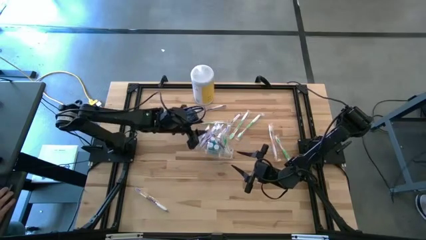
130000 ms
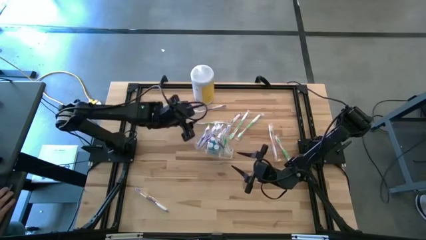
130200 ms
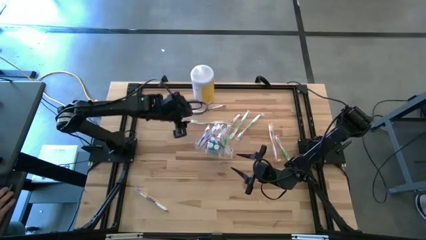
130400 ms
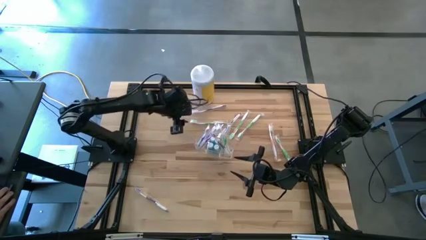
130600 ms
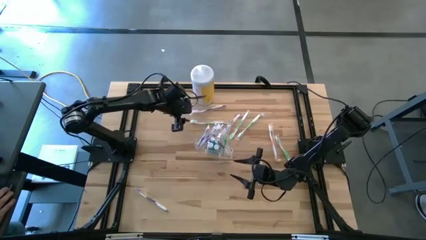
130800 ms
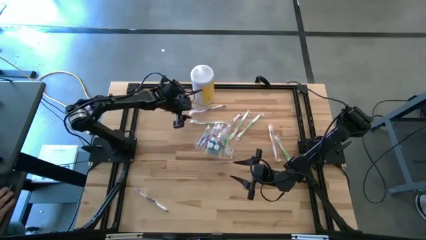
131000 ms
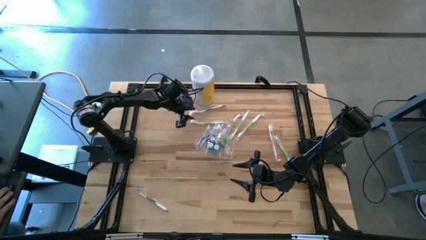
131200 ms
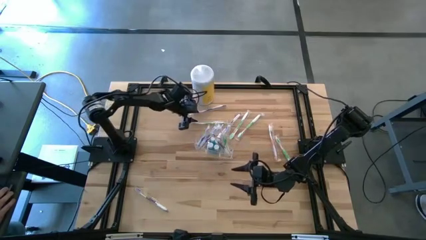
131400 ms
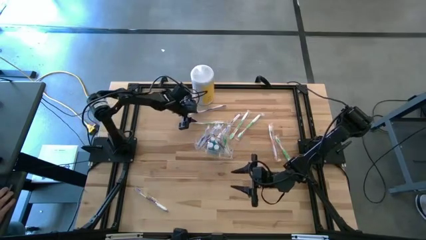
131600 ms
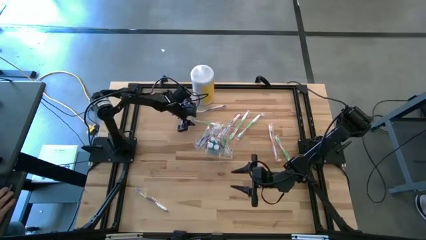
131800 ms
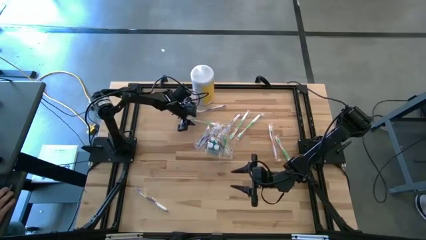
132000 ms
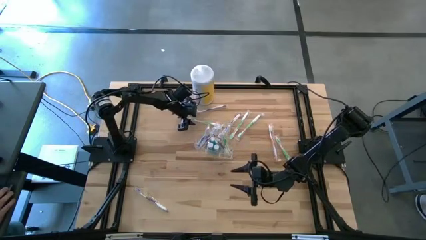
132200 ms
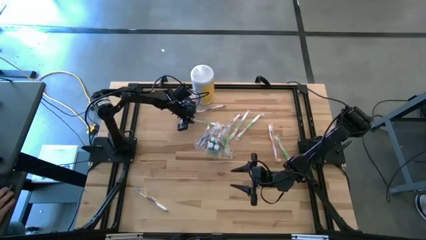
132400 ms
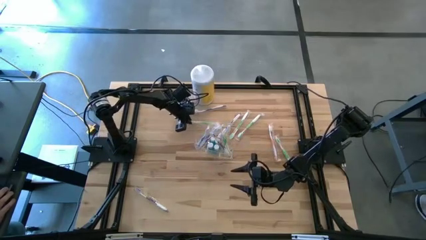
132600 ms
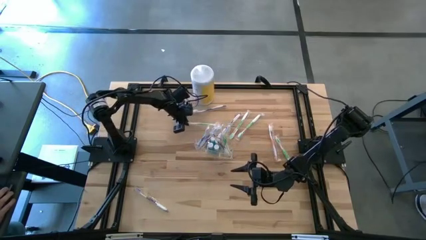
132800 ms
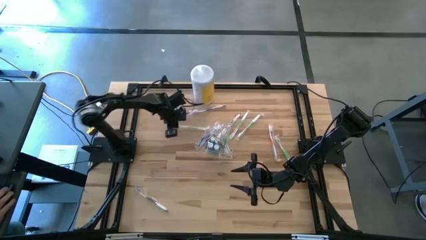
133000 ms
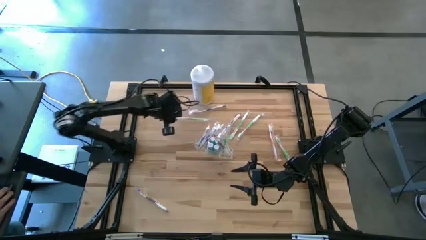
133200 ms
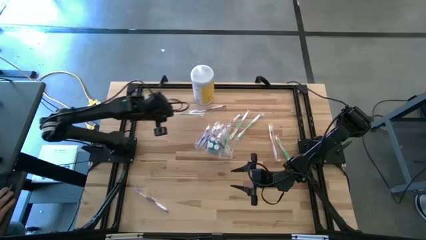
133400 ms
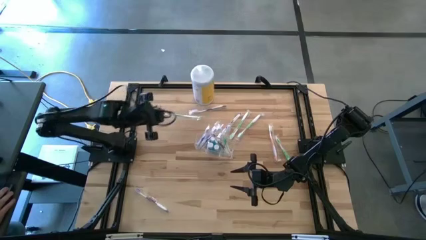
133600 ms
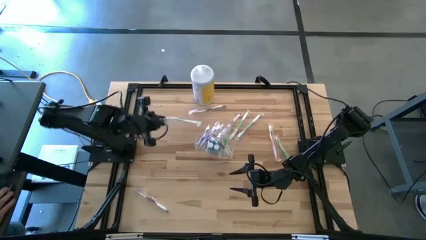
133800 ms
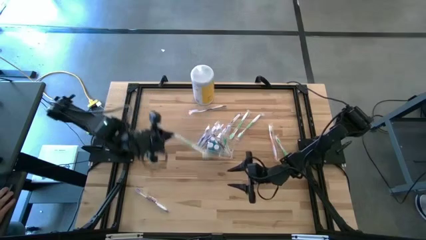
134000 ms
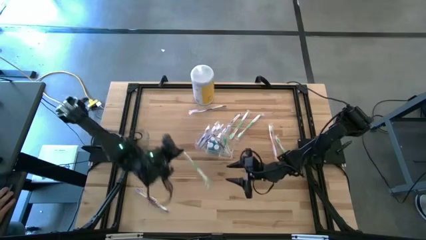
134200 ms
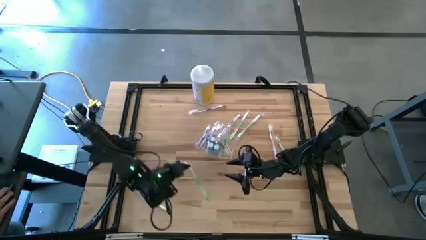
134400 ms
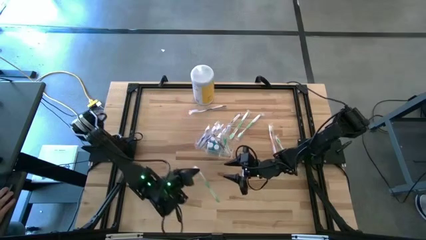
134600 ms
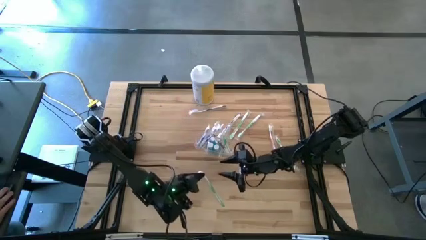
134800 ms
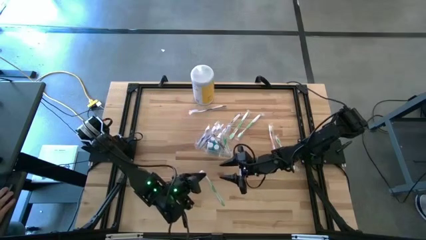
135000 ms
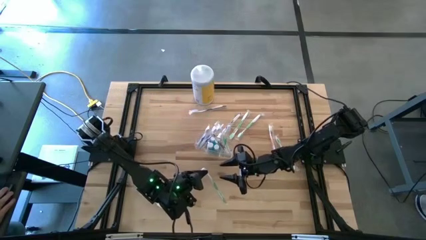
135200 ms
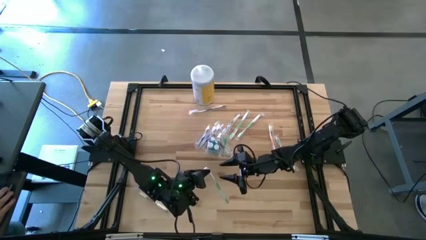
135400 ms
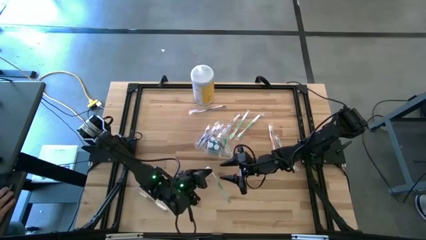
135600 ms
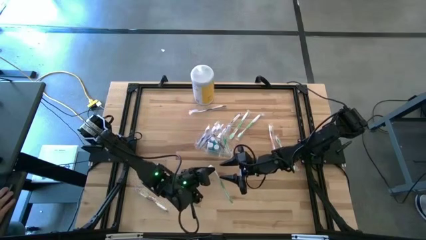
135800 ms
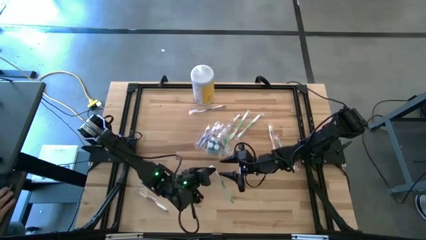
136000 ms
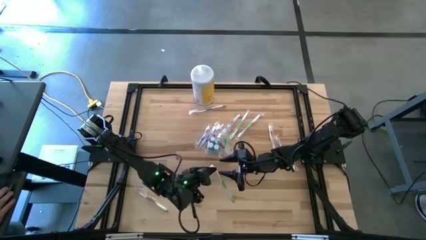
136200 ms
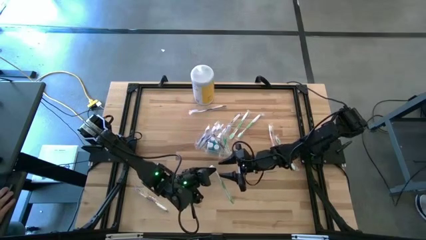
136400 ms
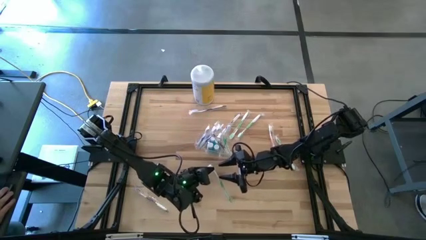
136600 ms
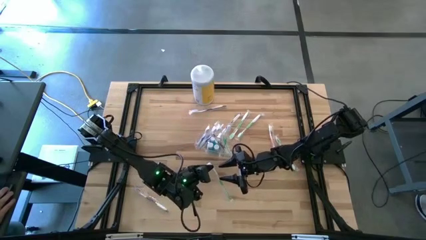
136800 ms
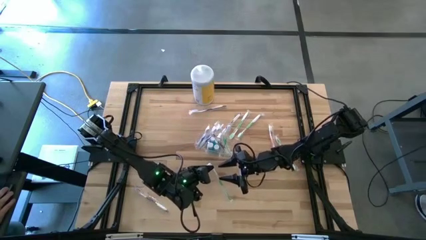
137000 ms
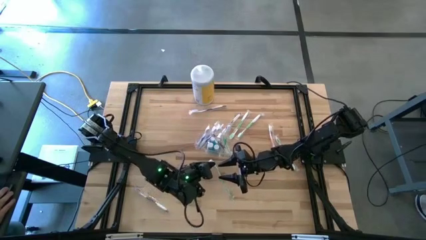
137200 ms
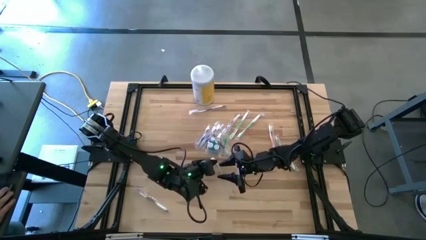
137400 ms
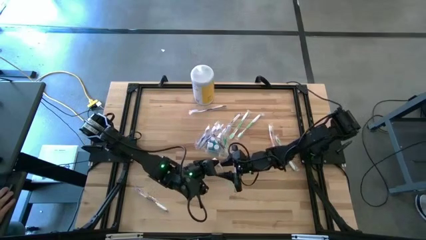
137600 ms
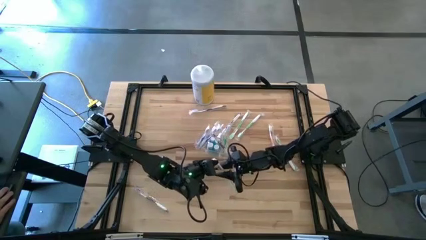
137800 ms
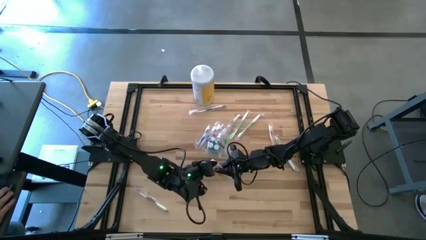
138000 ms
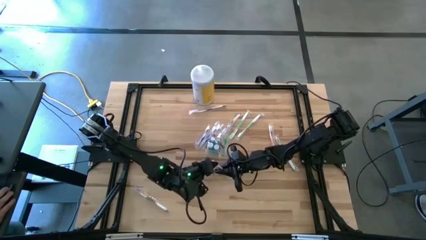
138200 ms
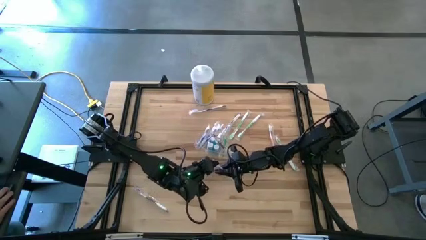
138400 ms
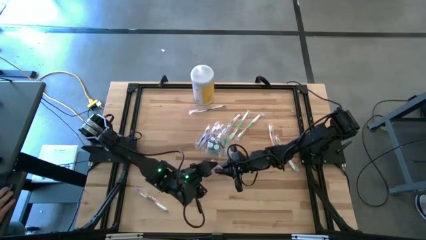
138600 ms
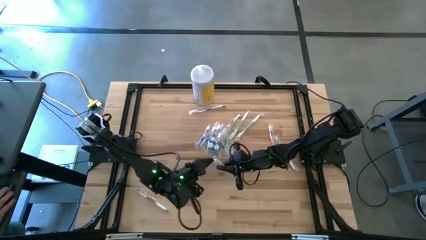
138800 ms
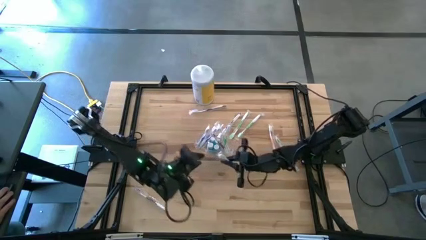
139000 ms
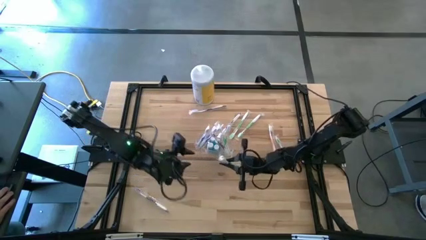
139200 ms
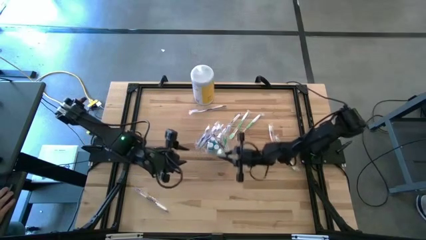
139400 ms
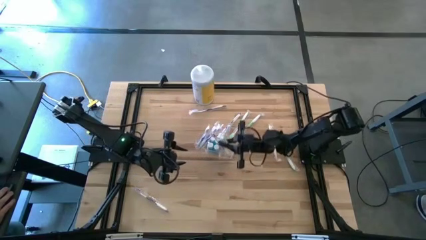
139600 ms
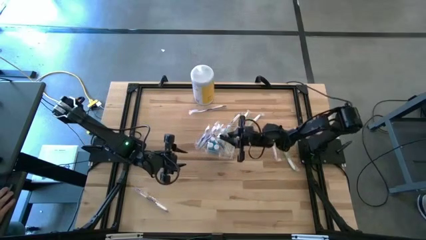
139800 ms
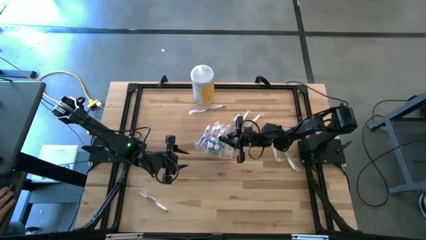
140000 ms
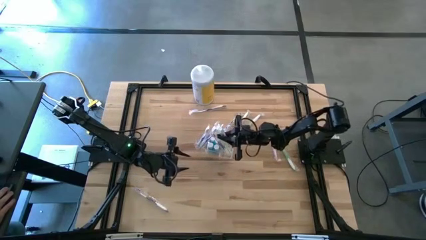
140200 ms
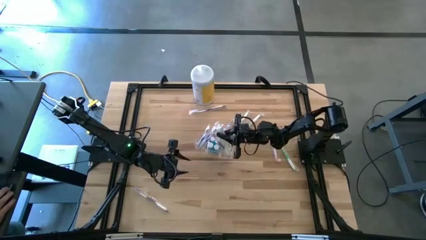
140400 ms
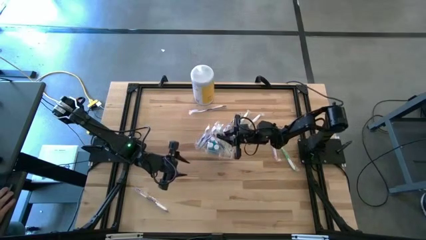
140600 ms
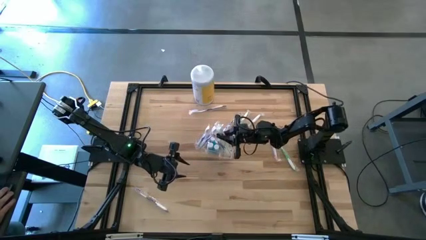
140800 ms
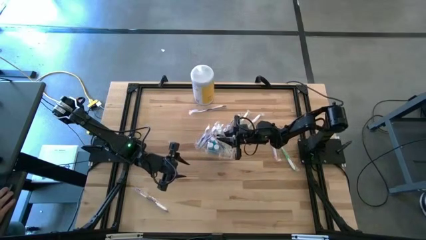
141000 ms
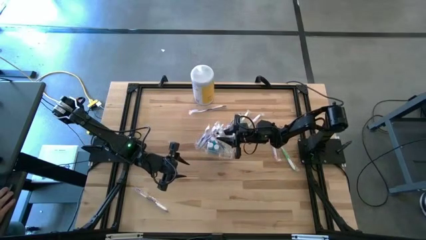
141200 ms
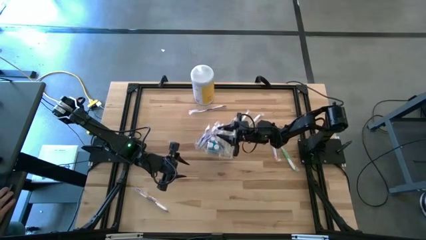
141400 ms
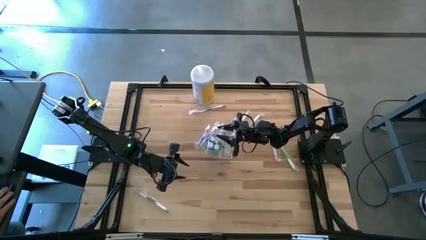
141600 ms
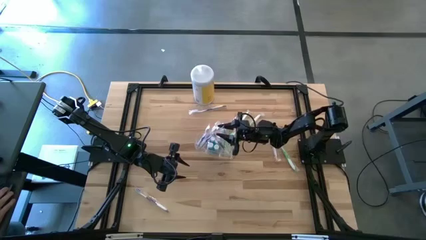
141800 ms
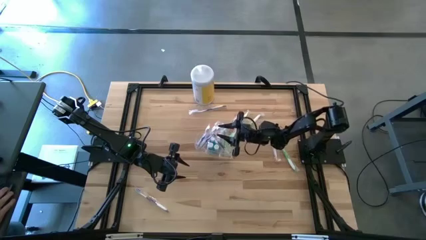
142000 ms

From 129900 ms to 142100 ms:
Task: Pick & Place toothbrushing station
Put the green toothbrush into the transparent organizer
